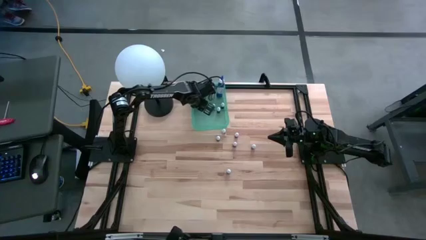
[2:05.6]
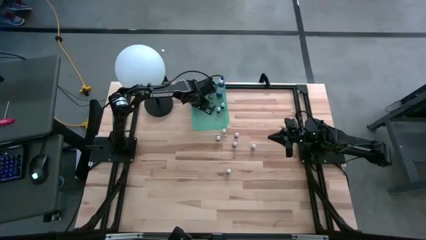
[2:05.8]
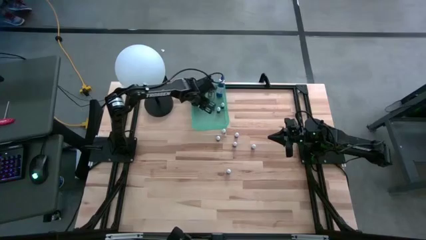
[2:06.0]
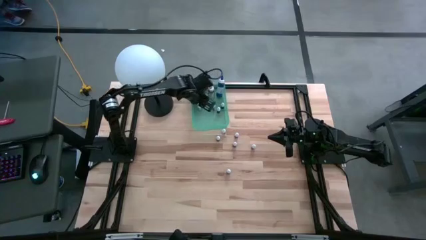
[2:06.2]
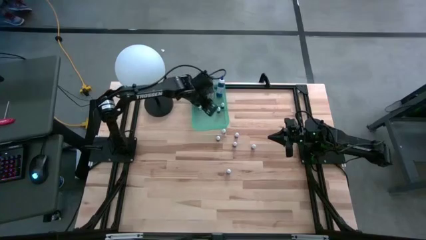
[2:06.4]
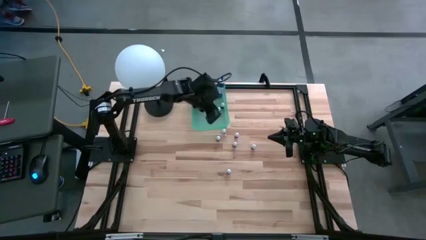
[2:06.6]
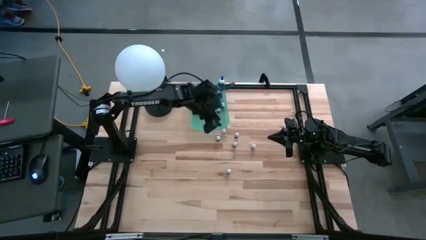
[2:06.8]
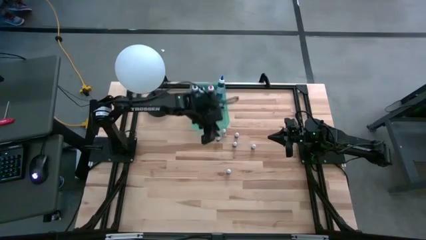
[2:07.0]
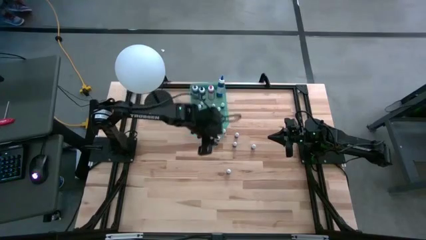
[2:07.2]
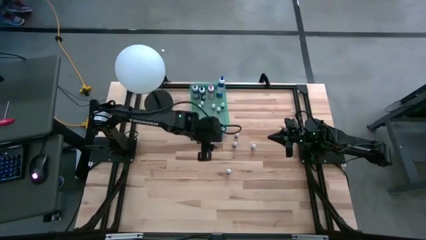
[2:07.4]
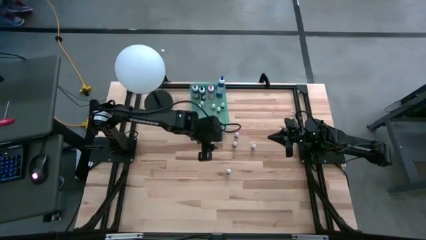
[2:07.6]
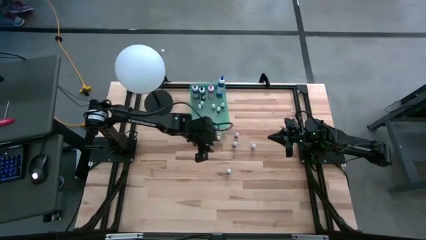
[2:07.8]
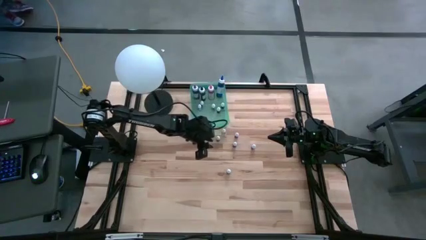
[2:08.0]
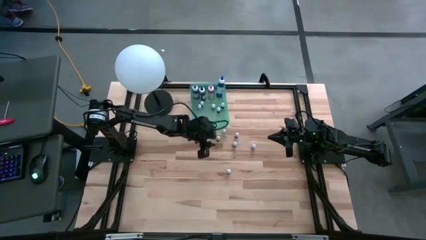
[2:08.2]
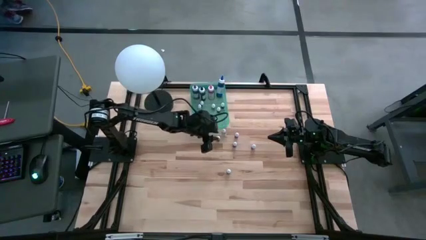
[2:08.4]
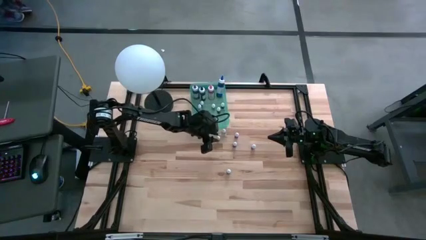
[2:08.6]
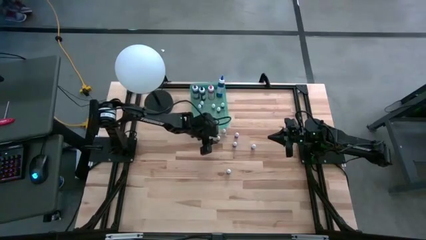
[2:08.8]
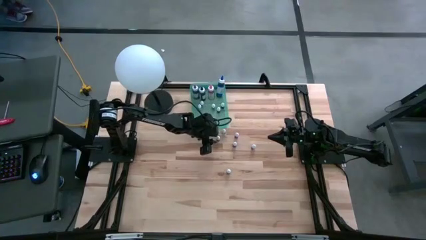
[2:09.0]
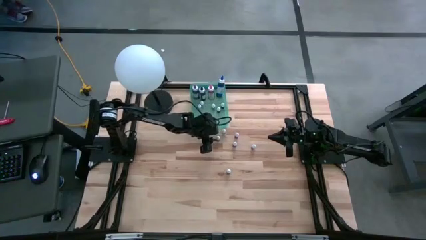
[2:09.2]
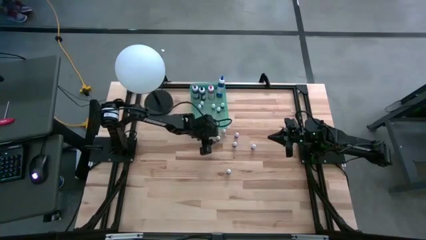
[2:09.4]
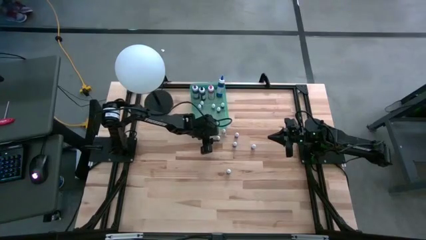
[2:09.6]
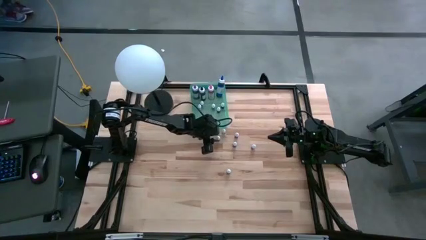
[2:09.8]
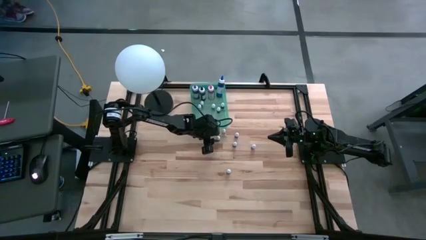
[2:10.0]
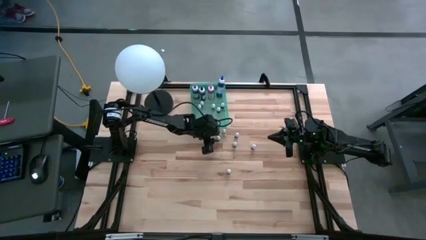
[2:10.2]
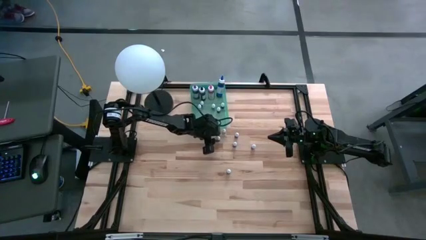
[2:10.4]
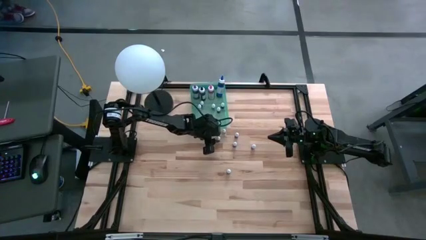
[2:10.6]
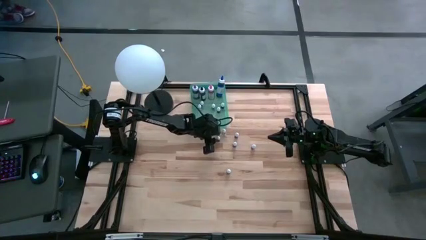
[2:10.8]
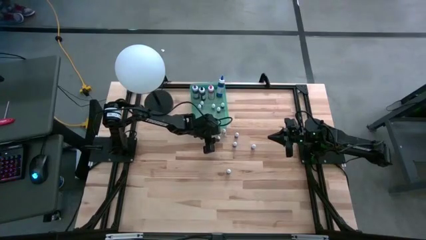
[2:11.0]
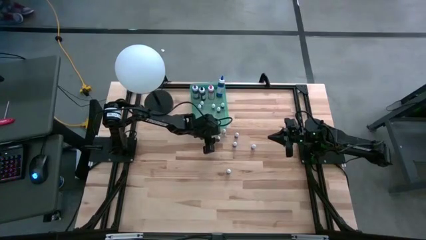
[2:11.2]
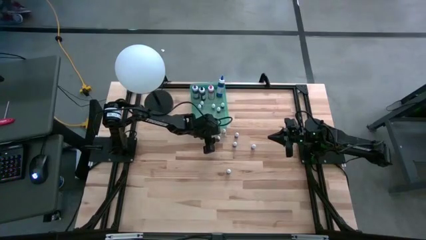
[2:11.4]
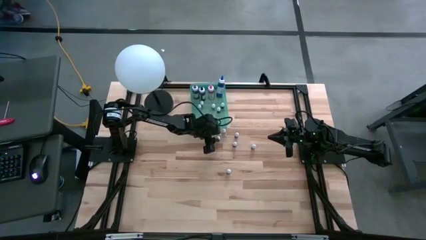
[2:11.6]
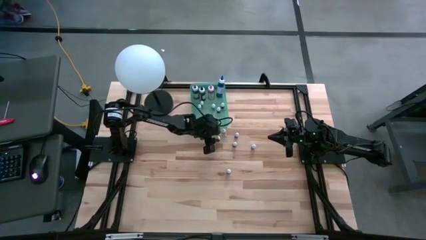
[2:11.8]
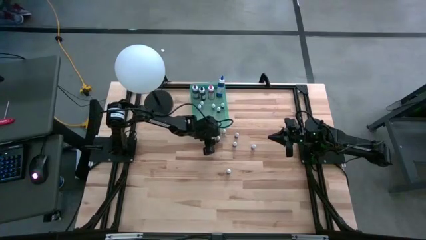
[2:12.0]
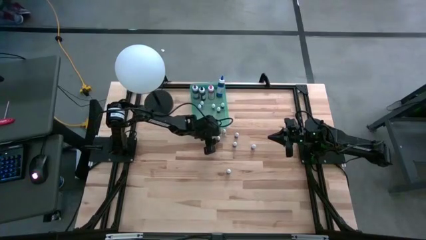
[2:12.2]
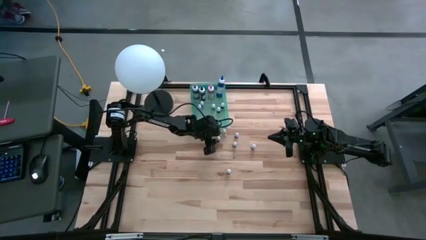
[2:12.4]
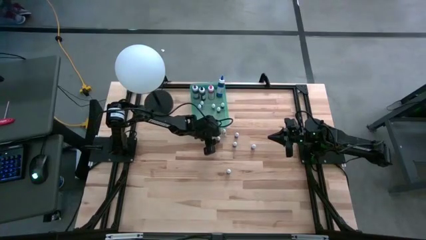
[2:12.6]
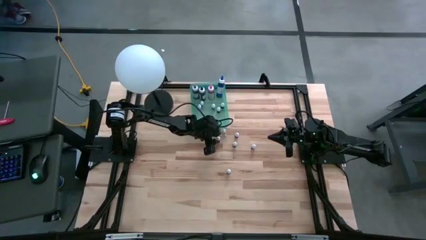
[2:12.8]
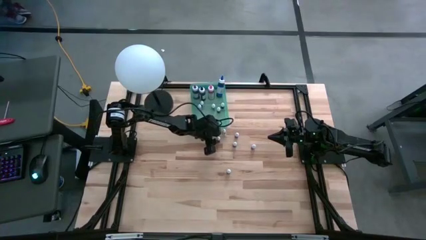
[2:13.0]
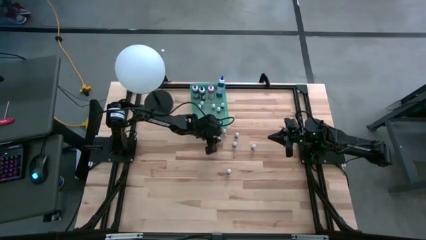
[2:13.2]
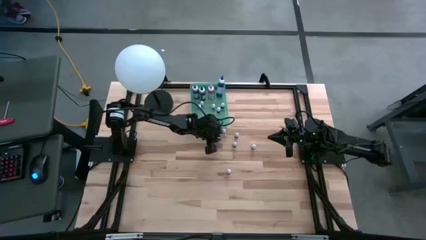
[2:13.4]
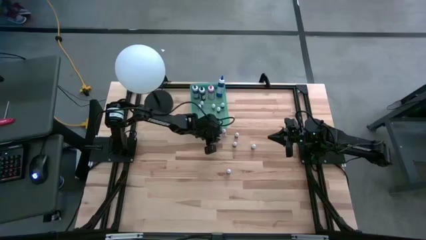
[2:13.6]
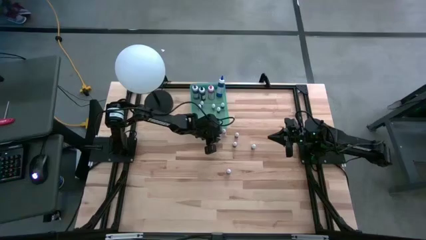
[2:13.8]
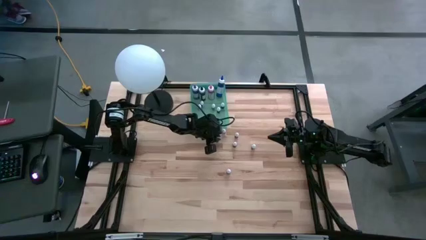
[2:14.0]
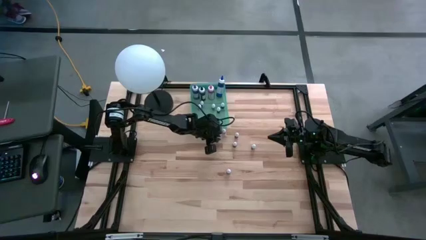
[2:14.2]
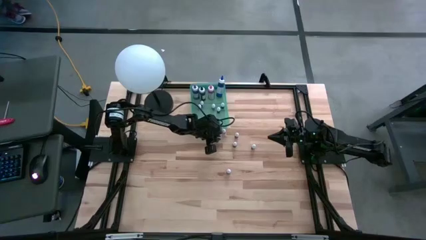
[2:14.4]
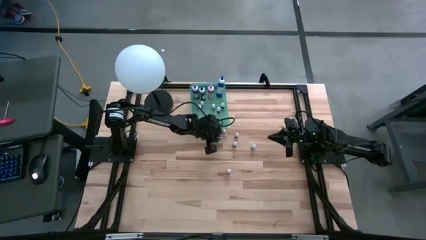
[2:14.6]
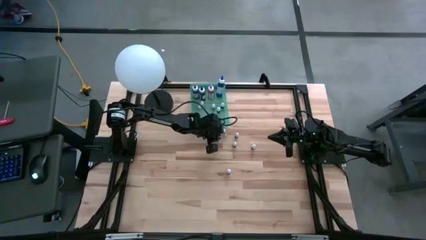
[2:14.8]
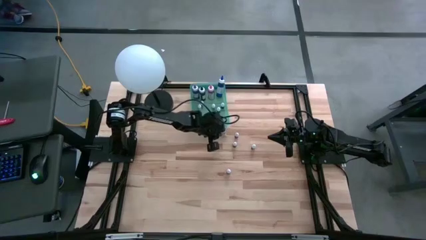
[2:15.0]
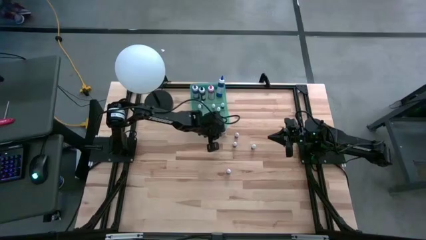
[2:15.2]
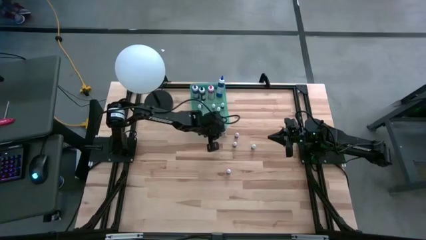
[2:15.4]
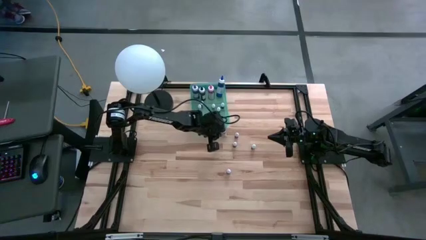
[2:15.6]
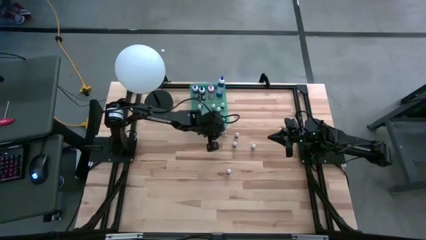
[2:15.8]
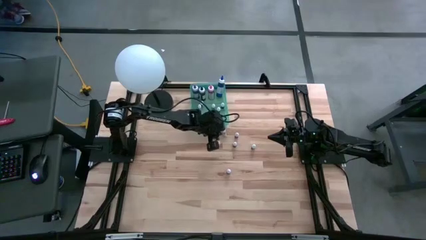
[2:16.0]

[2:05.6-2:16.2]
Task: Pick & Place food coloring
Put the small purple food coloring bottle into the blue bin

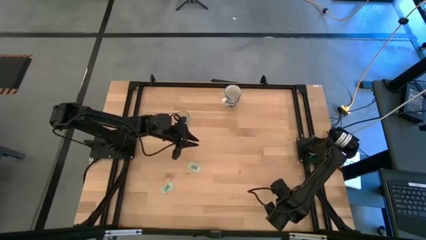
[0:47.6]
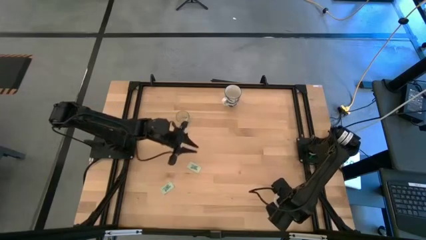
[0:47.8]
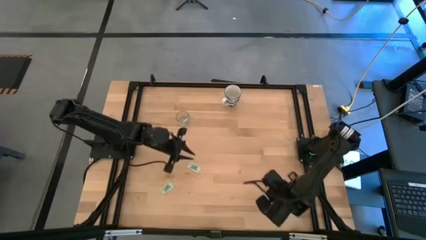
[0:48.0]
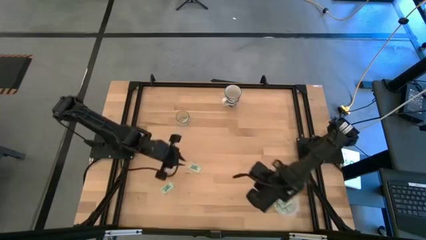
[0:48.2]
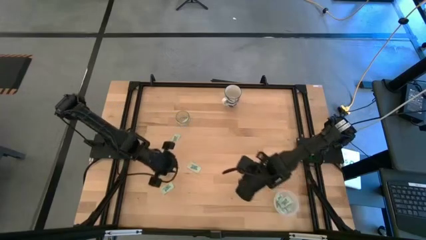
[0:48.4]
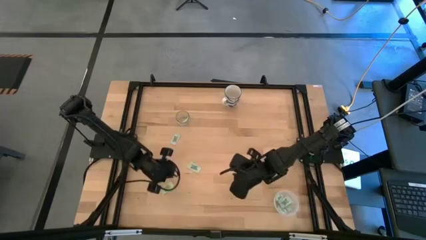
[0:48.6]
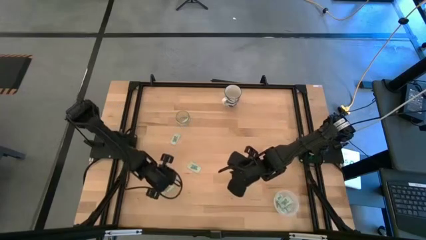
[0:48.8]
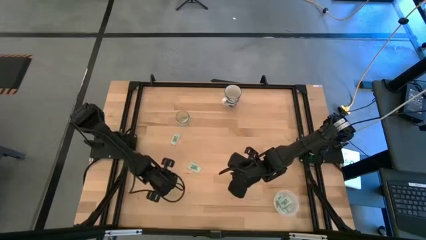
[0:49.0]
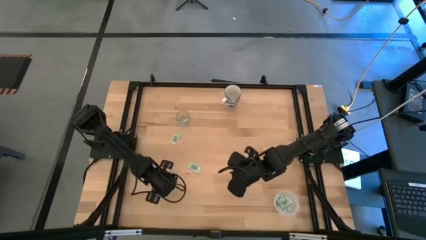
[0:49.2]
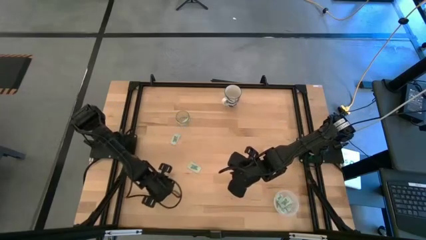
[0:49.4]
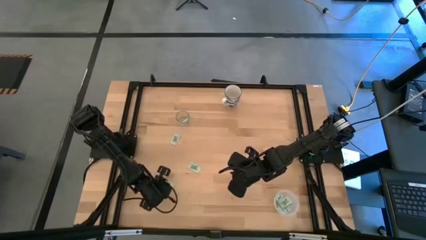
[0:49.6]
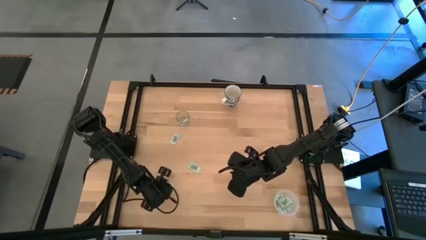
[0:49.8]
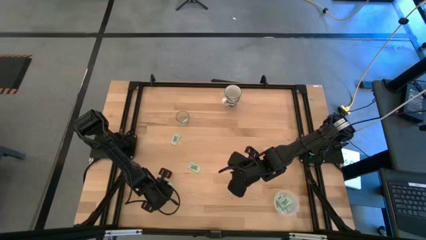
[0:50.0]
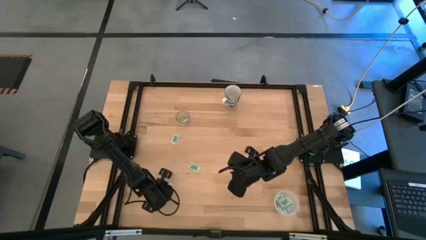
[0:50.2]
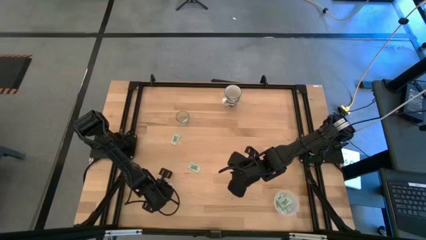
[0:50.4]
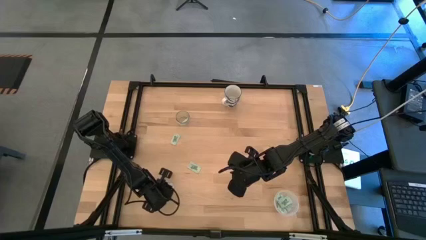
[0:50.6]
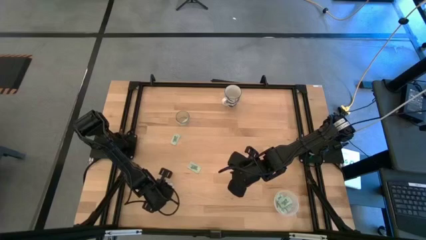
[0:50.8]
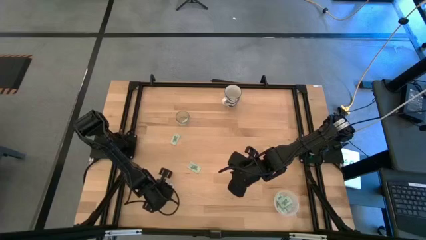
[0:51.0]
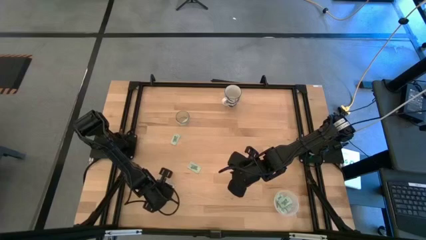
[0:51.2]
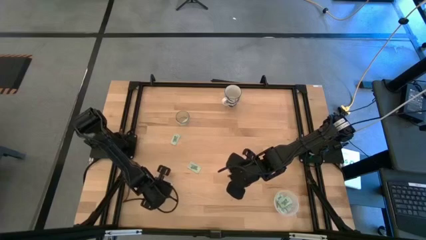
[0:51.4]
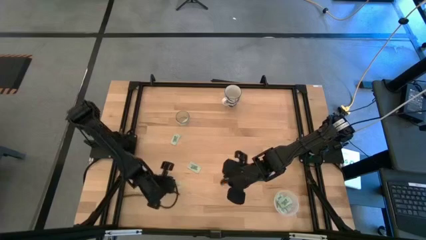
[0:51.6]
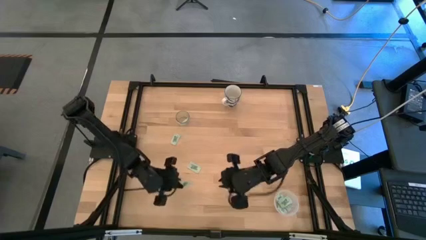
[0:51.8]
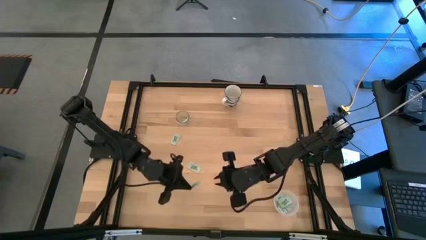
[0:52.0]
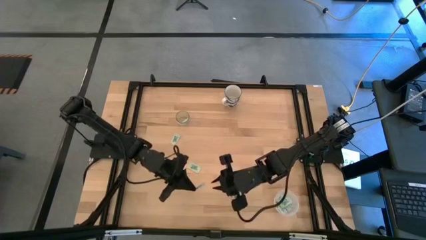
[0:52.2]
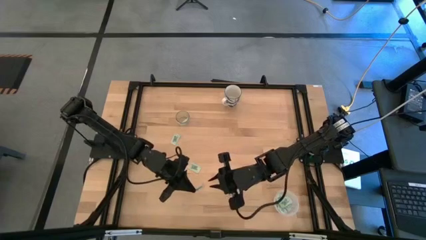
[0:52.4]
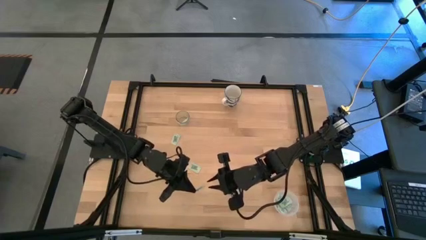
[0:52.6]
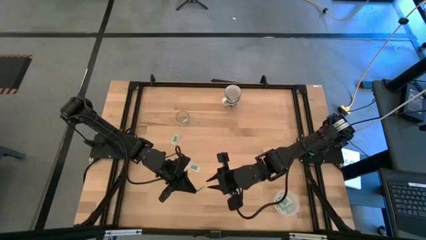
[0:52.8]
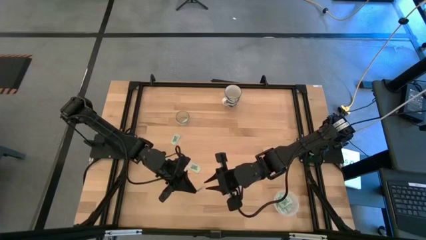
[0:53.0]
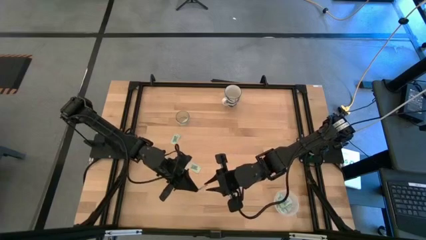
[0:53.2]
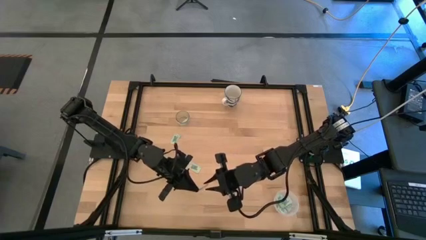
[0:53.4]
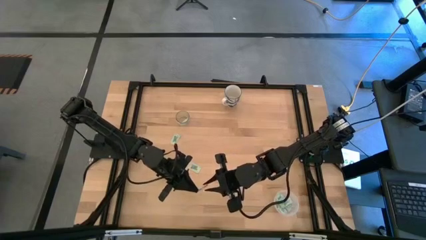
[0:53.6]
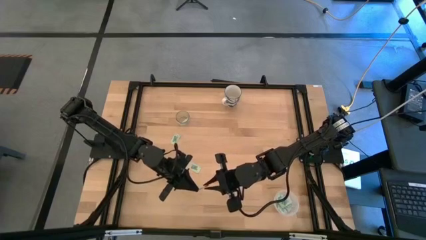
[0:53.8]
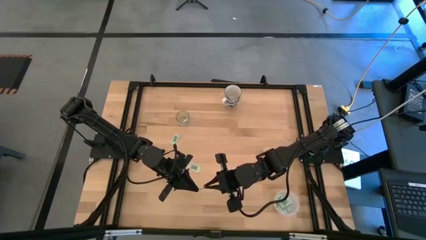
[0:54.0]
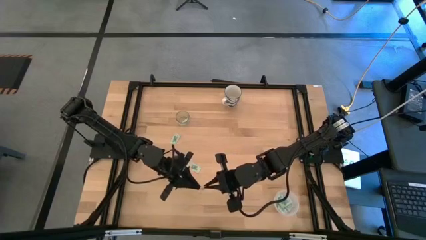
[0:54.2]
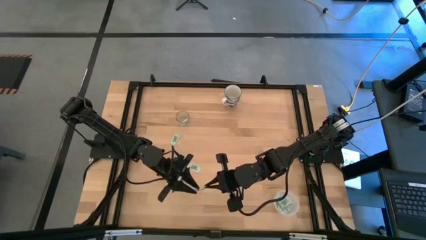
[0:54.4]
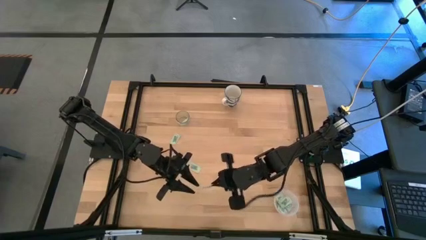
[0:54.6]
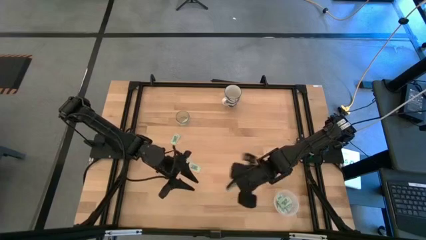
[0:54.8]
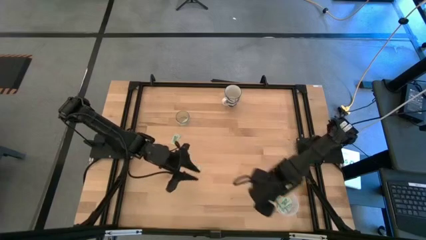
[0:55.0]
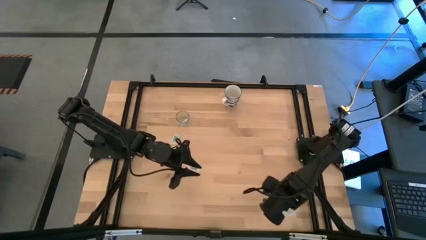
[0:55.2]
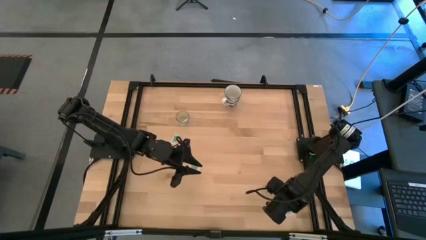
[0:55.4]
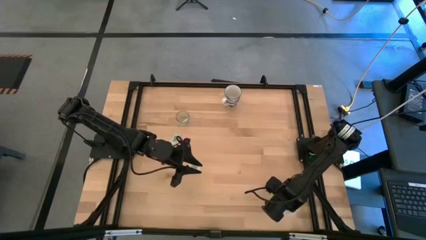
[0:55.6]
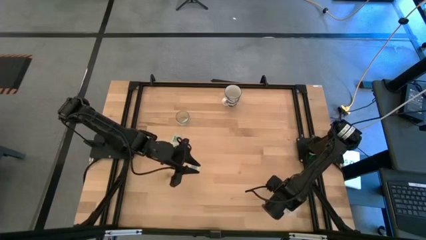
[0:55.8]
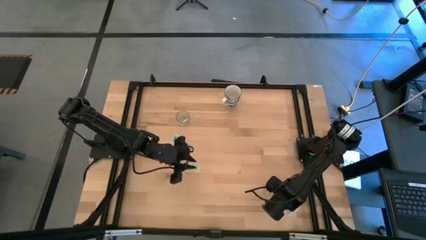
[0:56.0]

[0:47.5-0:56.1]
Task: Pick and place Stevia / Truvia into bins
Put the green stevia packet into the transparent container
